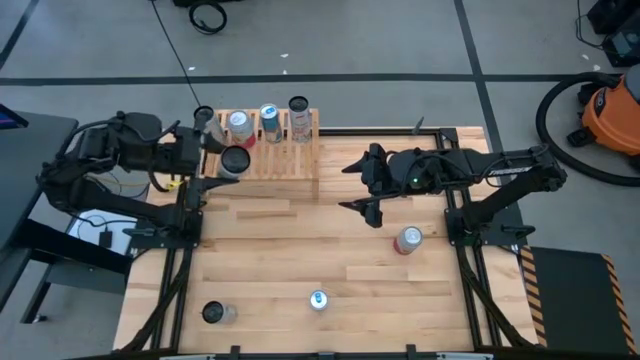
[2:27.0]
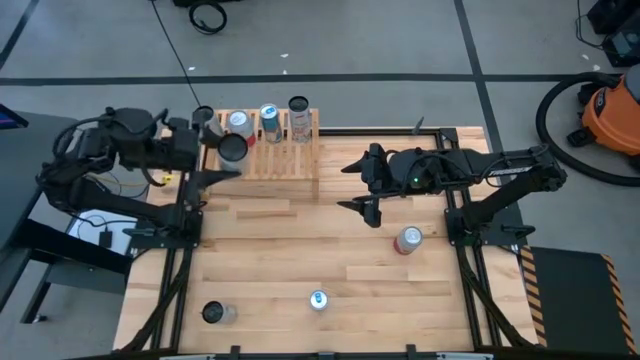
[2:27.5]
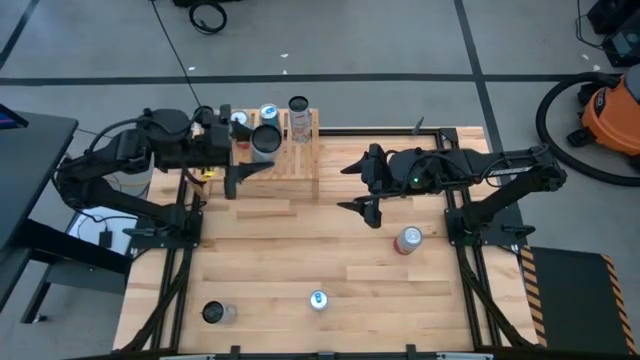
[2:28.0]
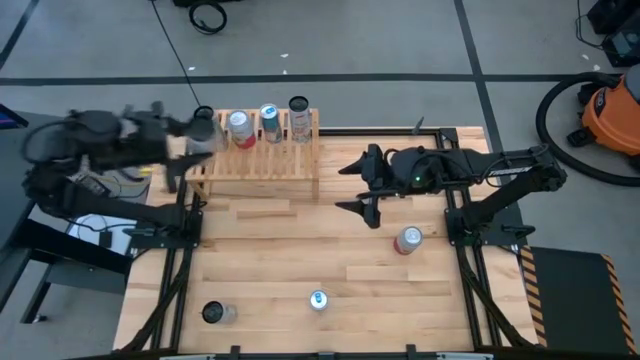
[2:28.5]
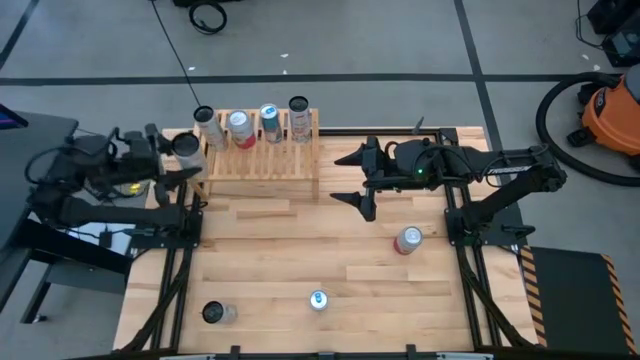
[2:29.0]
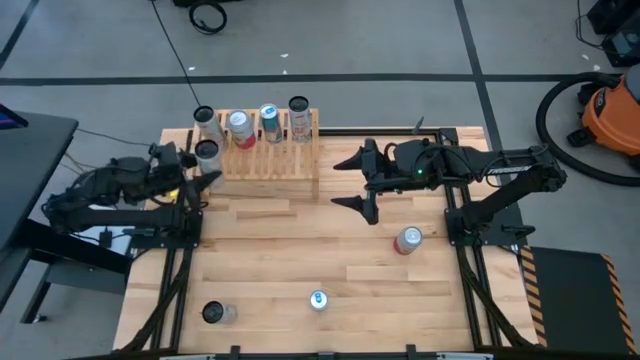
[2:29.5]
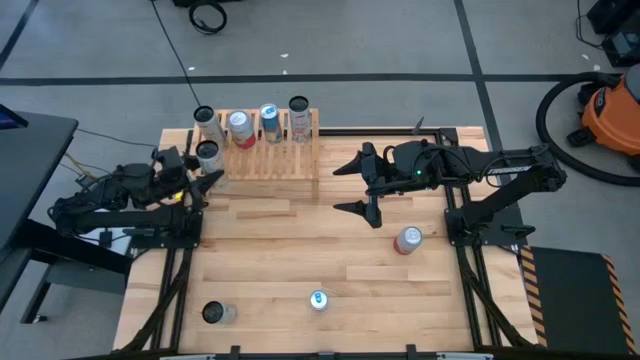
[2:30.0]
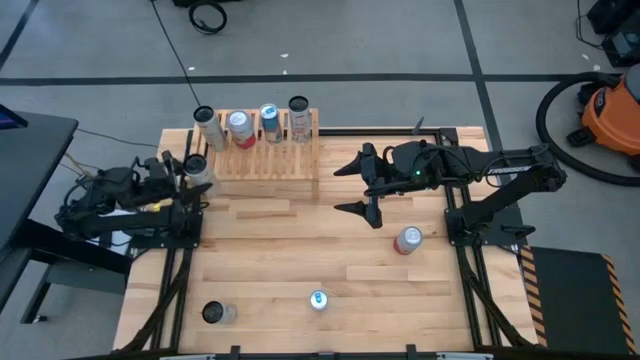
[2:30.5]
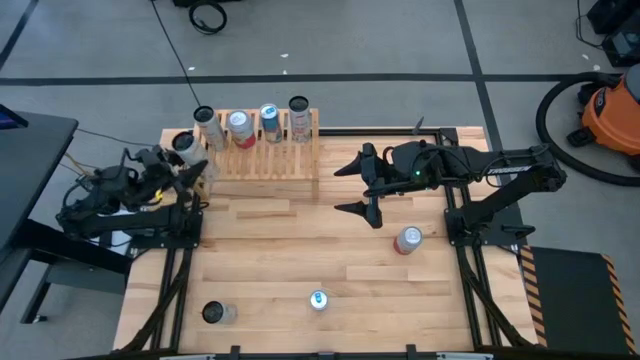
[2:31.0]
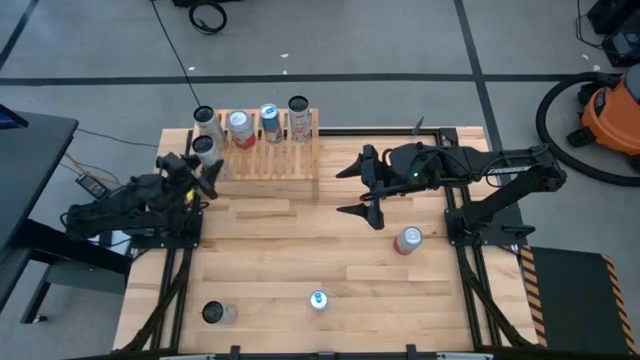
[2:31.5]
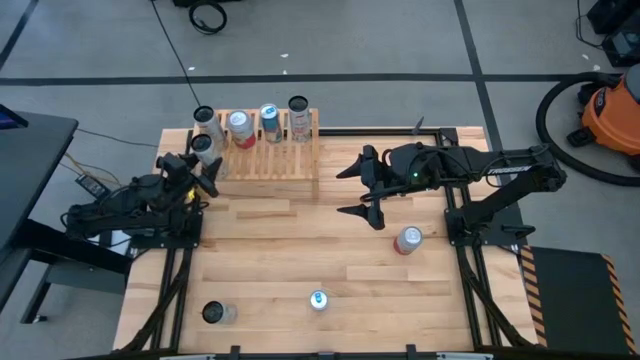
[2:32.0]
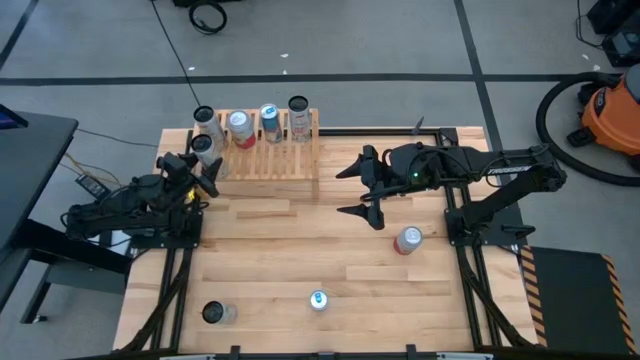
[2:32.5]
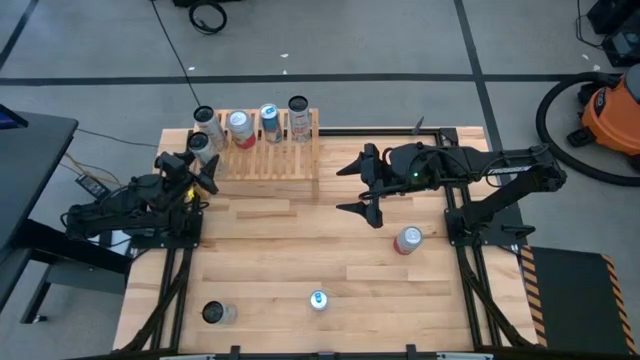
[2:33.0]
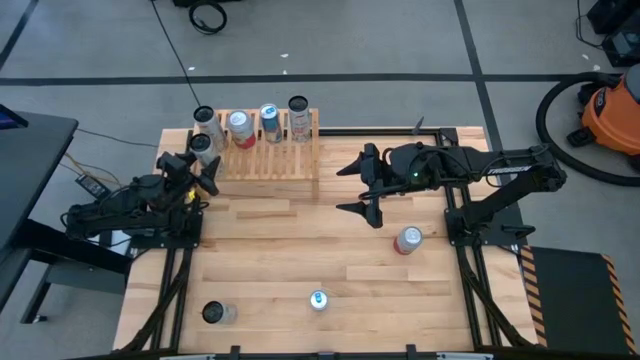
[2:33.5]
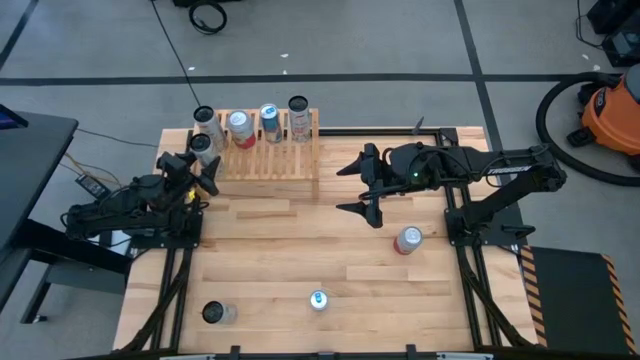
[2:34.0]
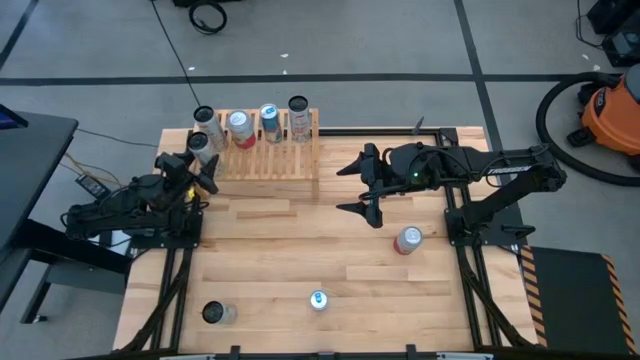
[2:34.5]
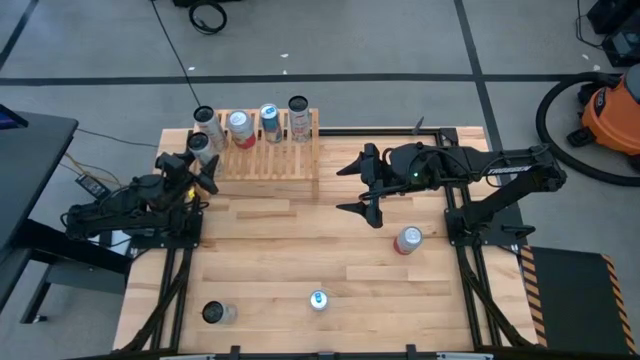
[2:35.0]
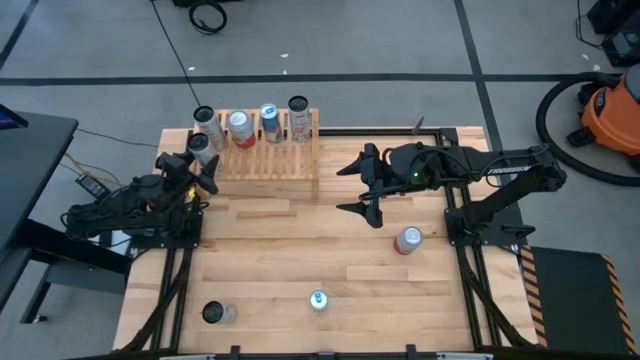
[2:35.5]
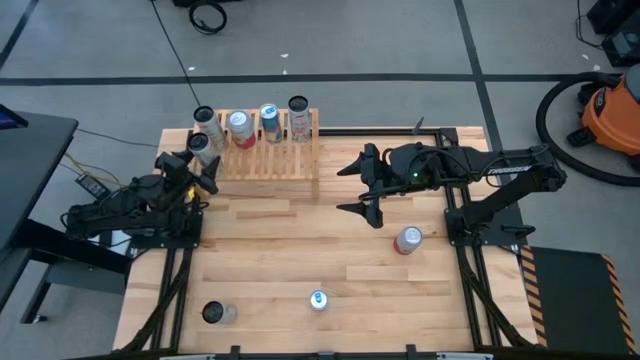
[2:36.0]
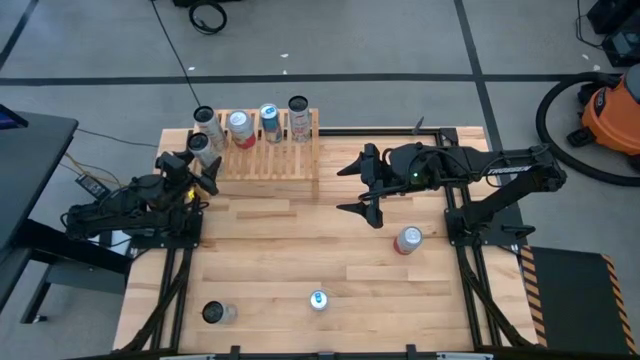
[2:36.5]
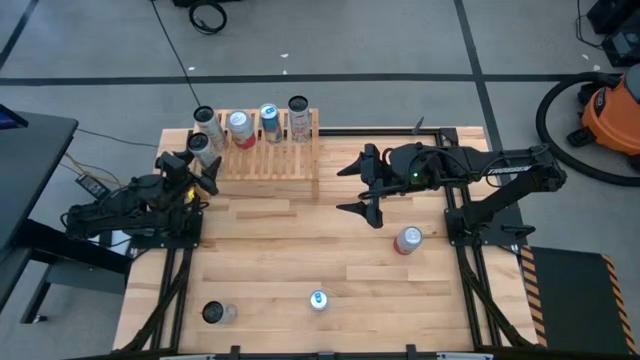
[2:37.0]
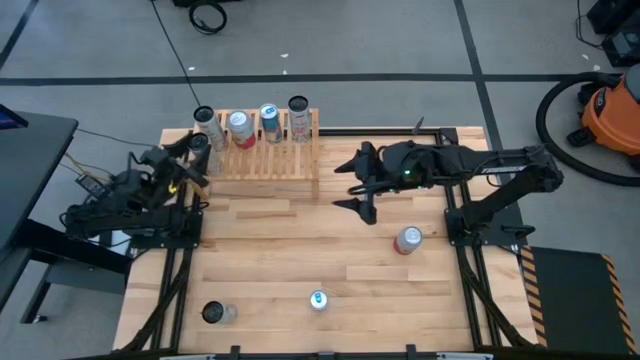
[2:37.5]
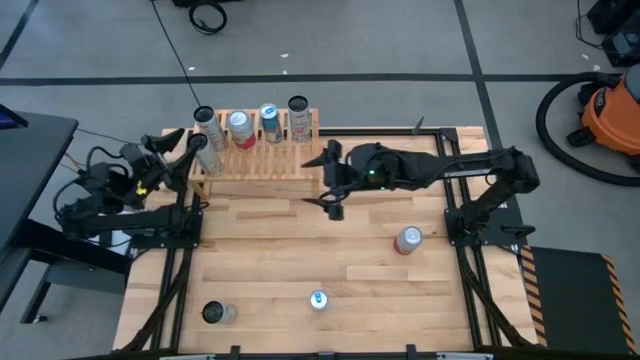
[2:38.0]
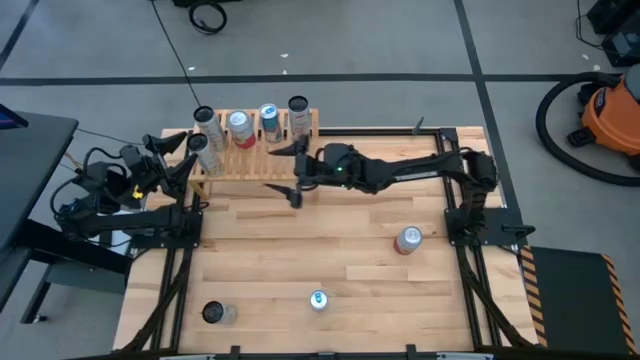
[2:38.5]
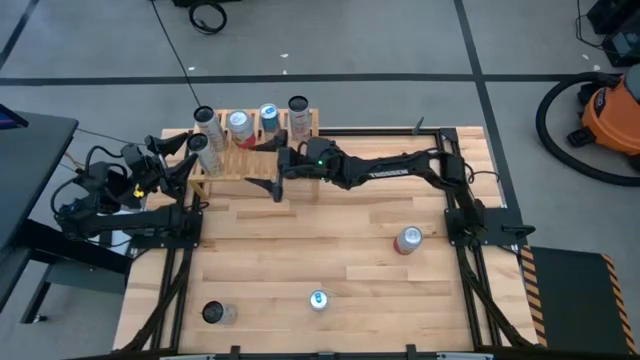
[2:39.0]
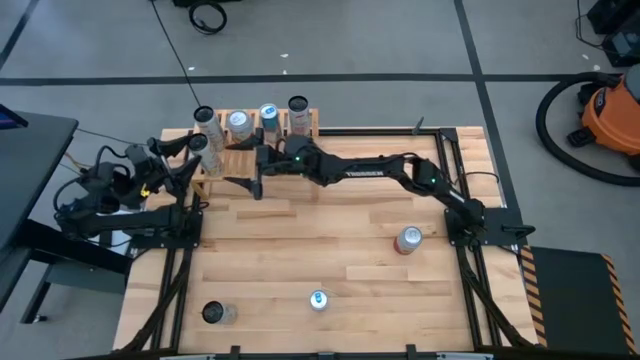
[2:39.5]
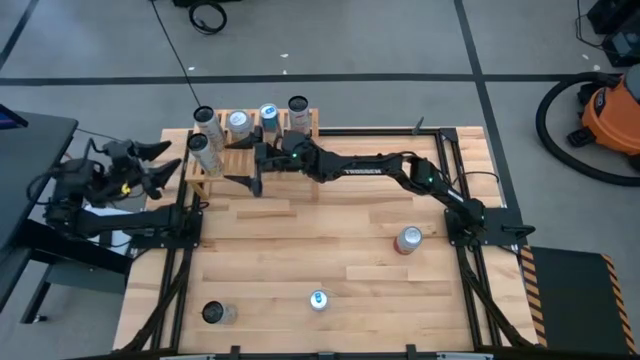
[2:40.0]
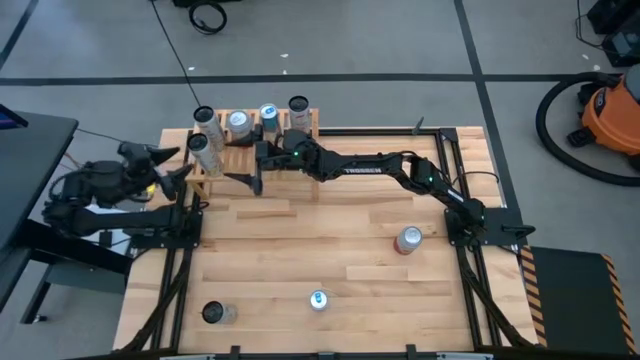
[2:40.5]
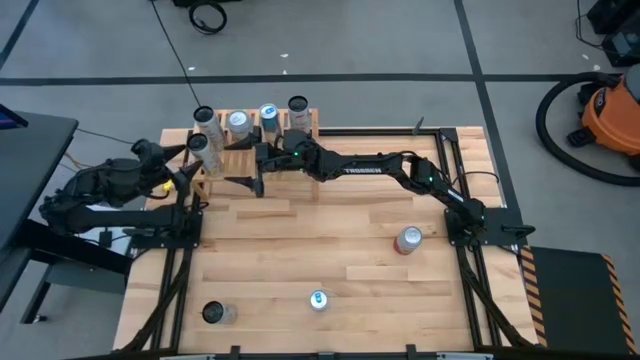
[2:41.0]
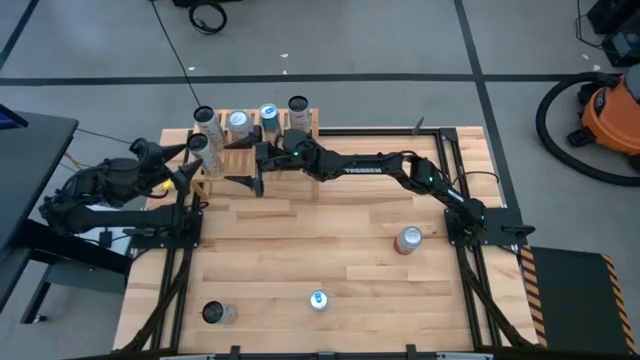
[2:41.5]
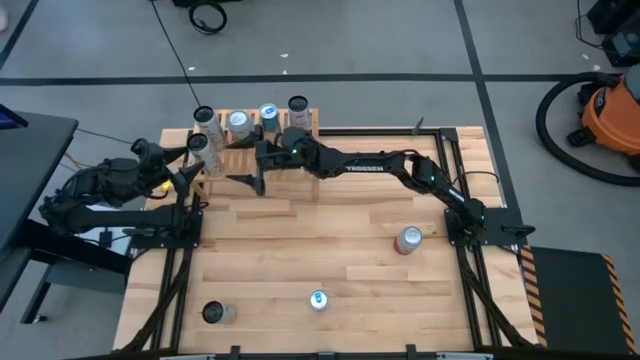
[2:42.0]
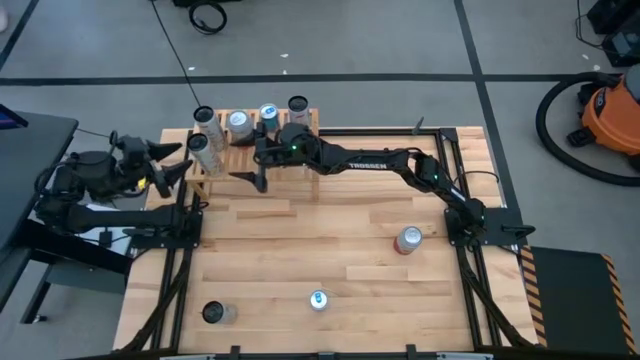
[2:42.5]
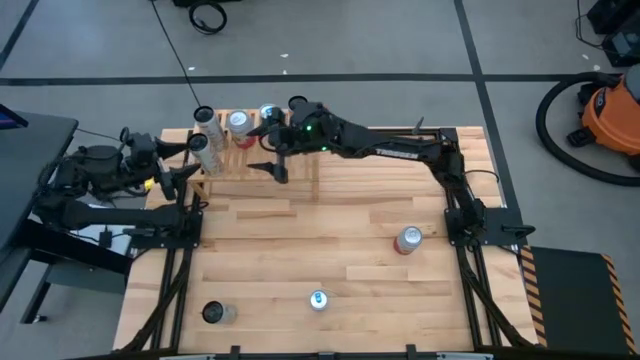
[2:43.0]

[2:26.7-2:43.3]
Task: Place canned beverage on shelf
Put the white yellow soda can on the shelf aligned with the other white yellow soda can

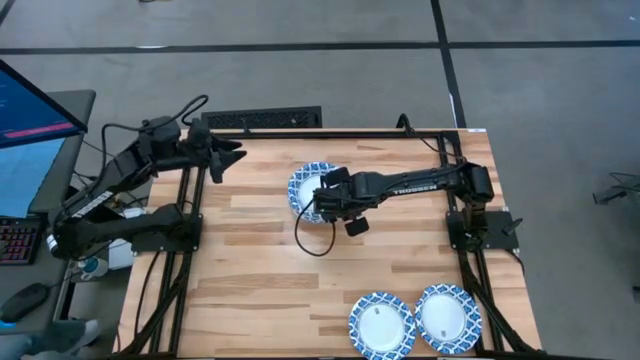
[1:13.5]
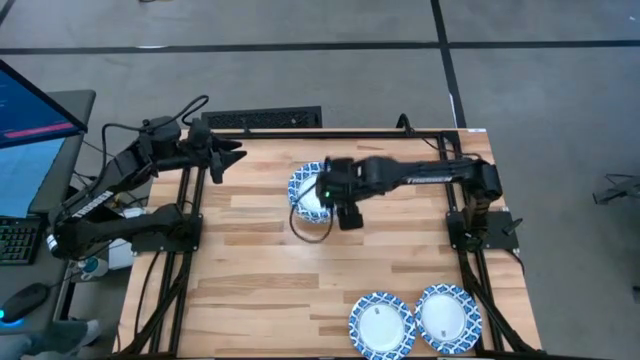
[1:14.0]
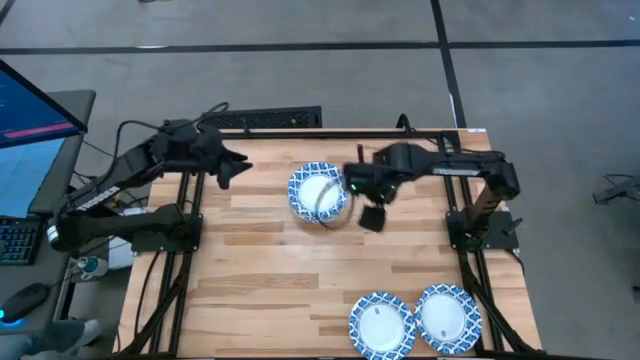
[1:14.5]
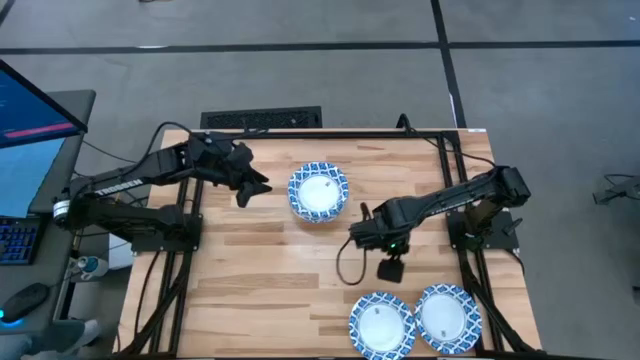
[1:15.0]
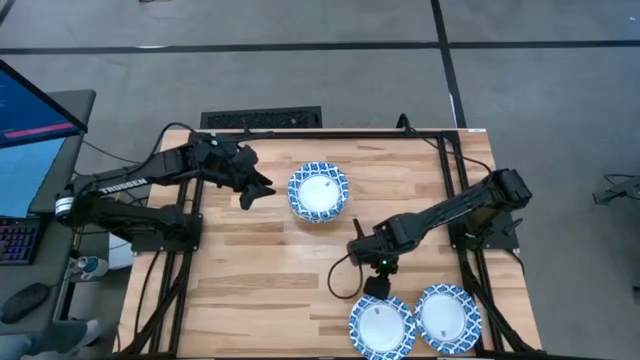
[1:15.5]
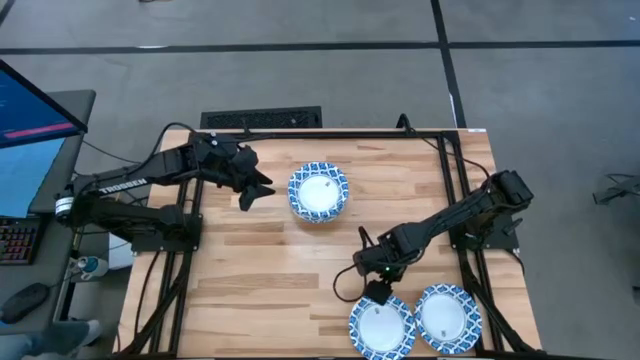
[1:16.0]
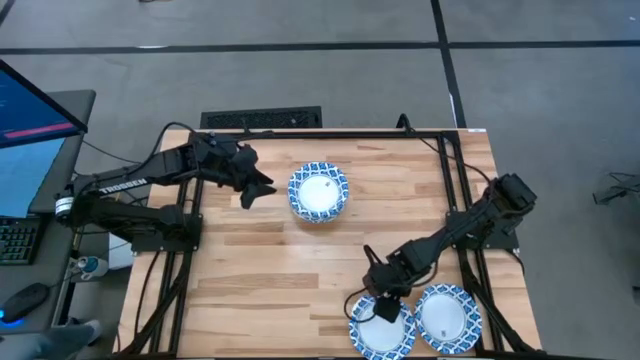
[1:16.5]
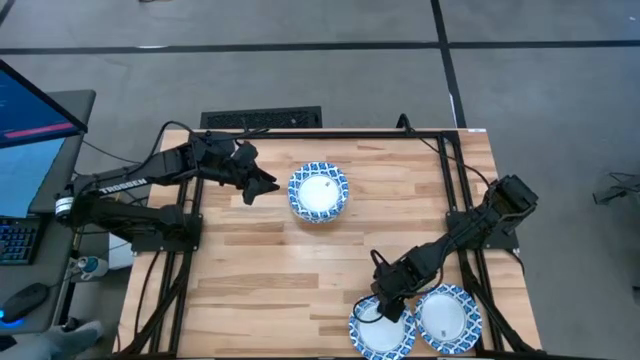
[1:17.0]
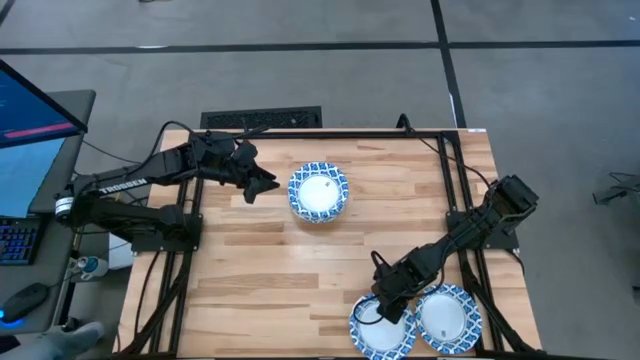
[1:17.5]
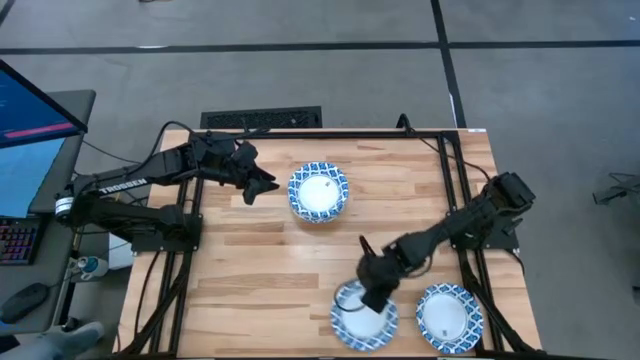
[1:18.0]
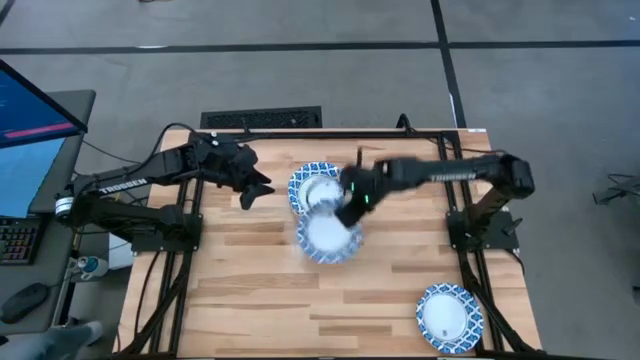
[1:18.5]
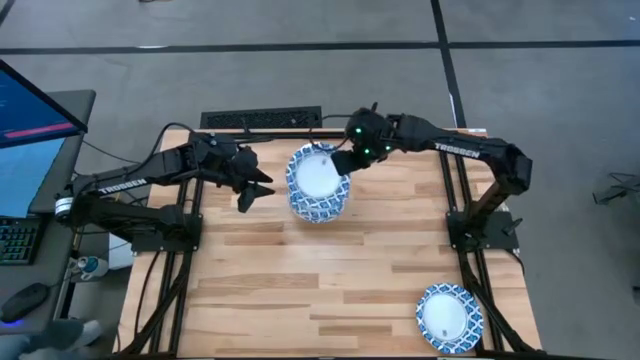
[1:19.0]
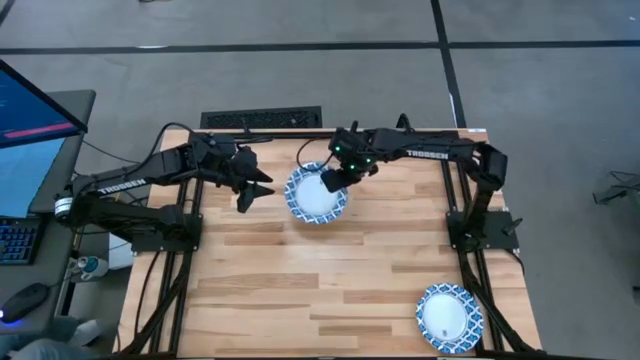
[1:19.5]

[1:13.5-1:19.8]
Task: Nest bowls inside each other
Stack the white bowl on the stacked white bowls
